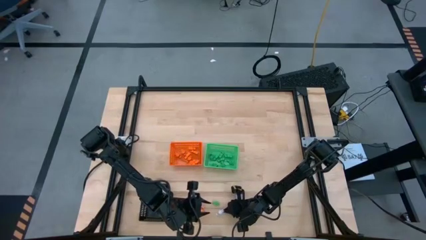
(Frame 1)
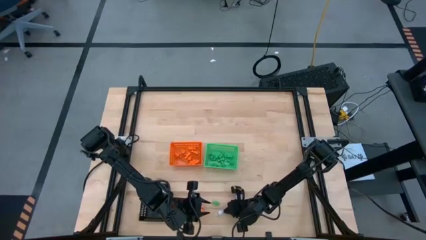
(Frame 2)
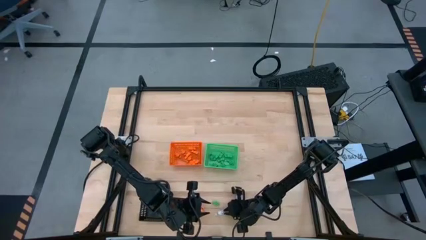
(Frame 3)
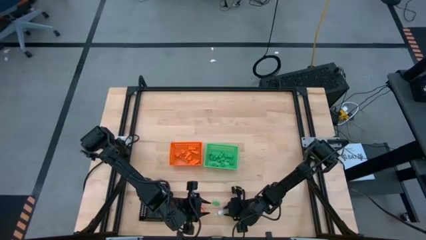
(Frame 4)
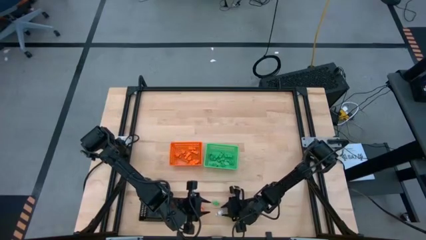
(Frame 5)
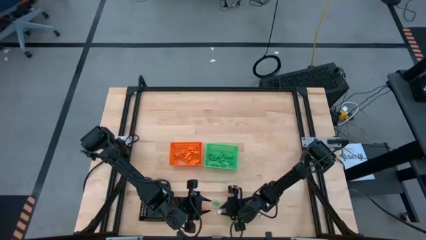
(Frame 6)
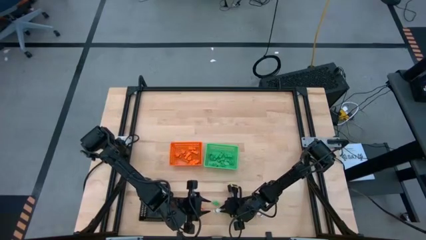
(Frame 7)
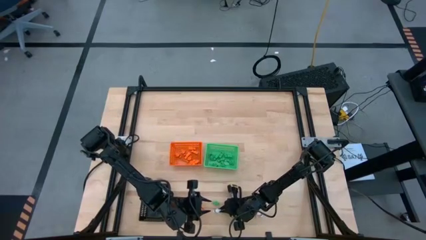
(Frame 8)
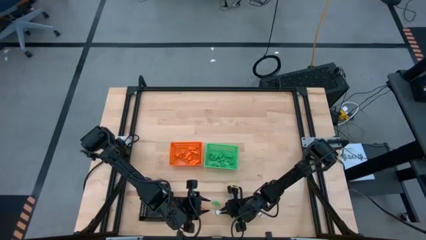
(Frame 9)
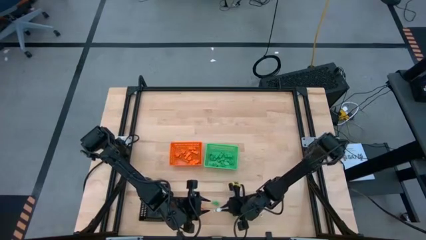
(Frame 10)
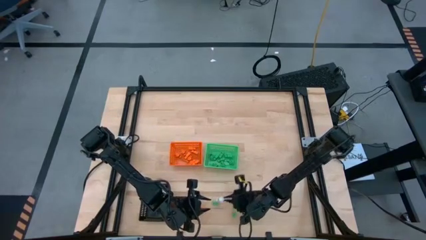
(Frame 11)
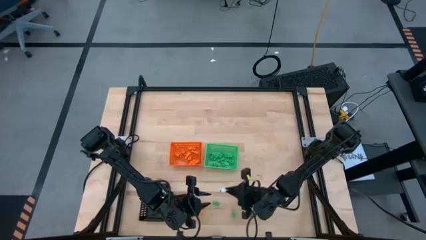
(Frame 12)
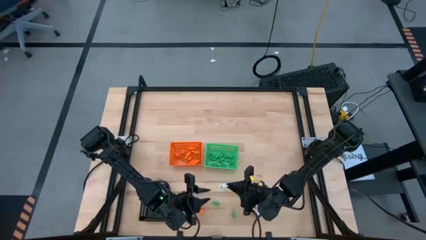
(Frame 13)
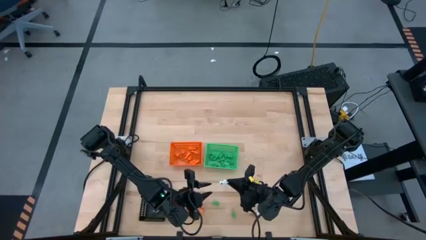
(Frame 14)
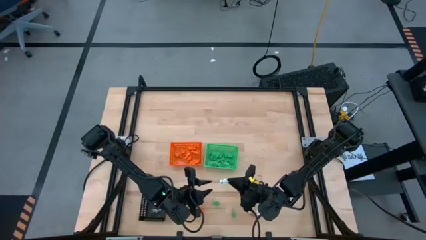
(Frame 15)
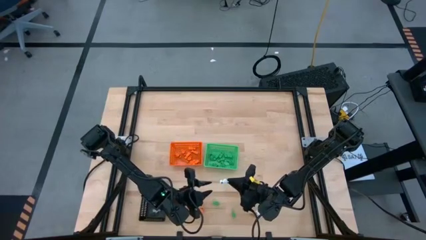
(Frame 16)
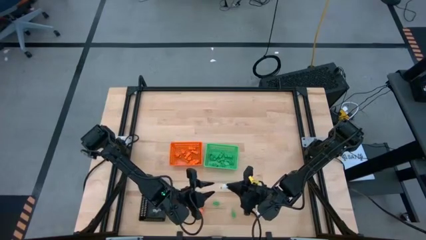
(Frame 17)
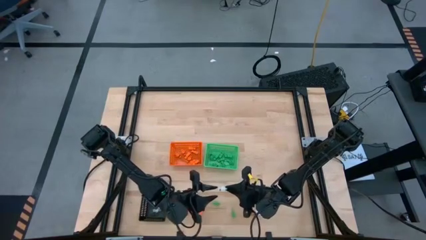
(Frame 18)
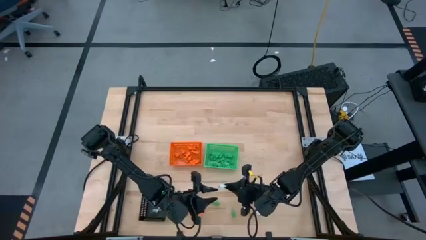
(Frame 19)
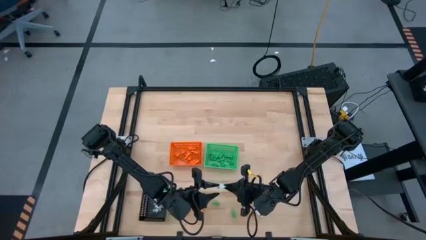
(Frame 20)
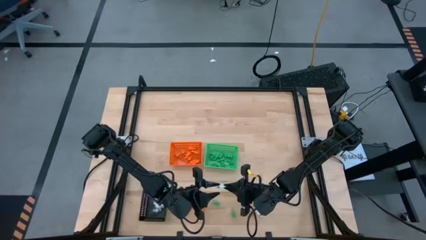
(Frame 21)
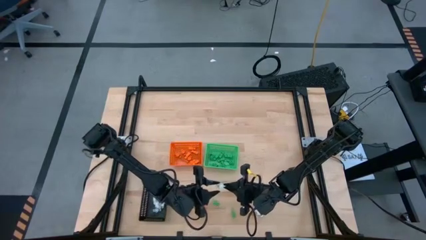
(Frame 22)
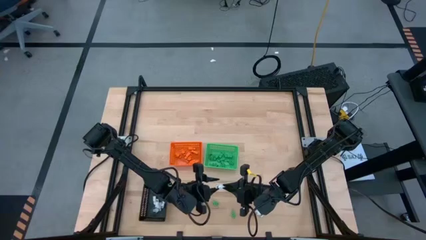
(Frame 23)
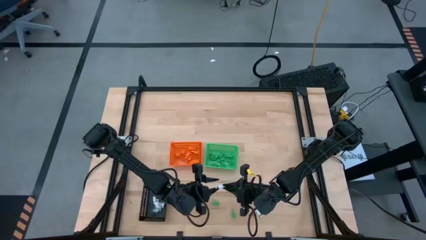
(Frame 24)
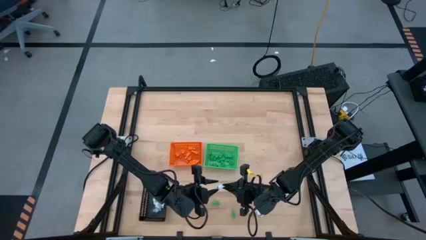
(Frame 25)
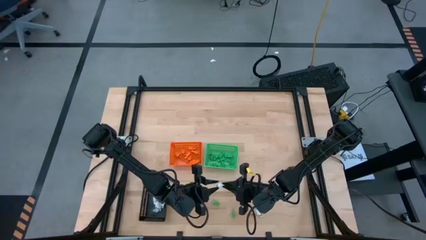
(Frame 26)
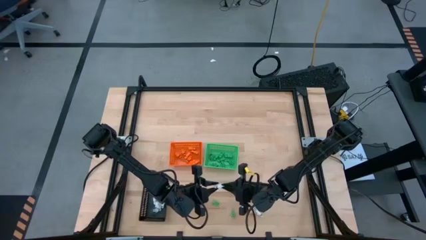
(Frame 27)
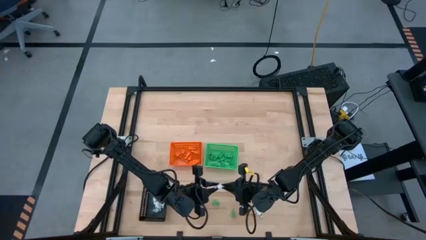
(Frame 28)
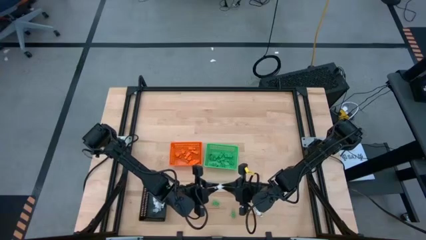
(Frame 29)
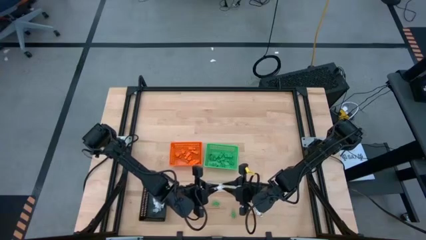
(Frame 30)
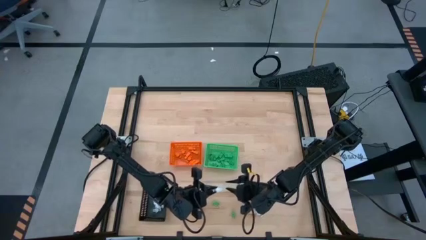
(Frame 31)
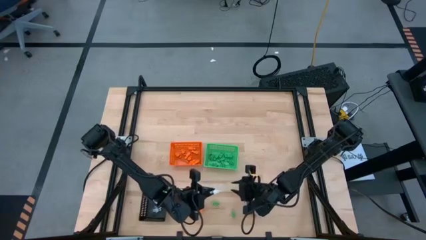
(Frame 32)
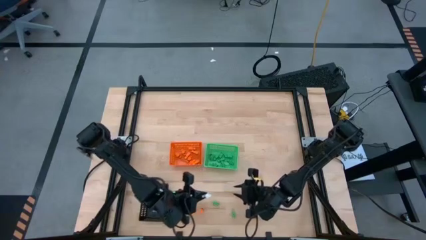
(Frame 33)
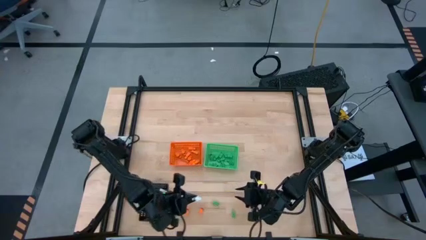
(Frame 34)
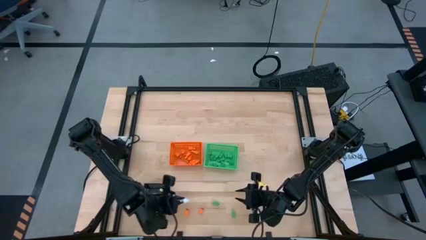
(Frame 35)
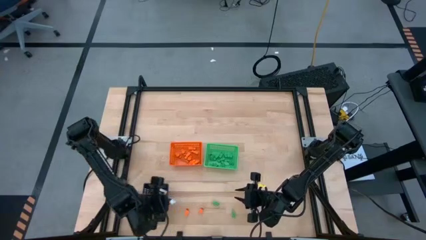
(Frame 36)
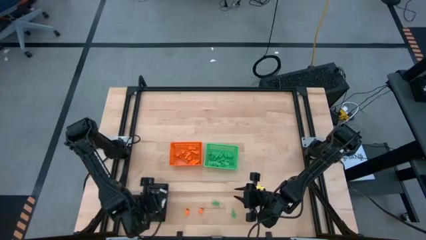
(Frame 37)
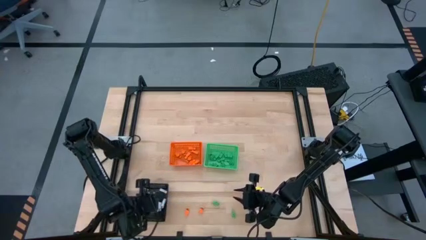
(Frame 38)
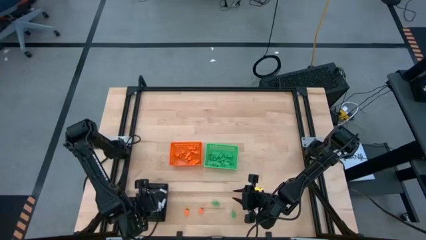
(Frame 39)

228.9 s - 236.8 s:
Task: Sort Halloween decoration
Put the white skeleton toy into the black bin

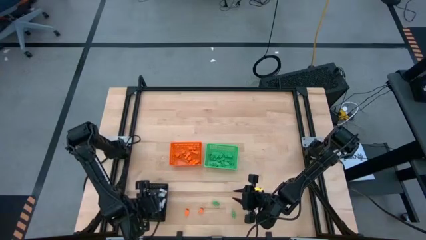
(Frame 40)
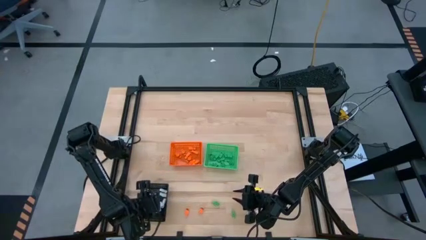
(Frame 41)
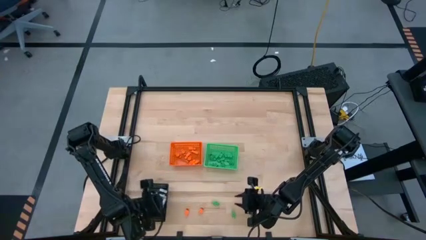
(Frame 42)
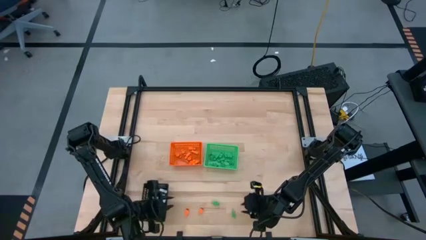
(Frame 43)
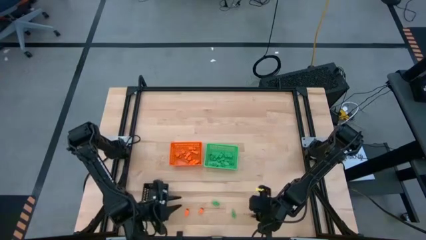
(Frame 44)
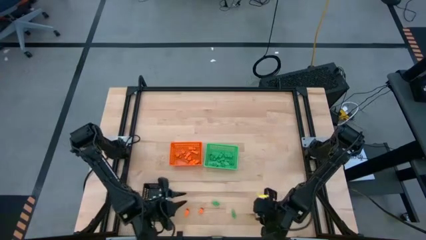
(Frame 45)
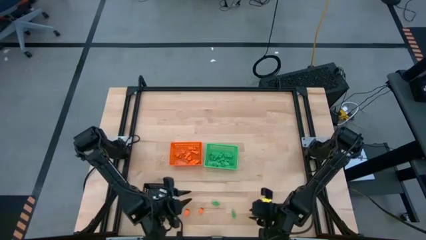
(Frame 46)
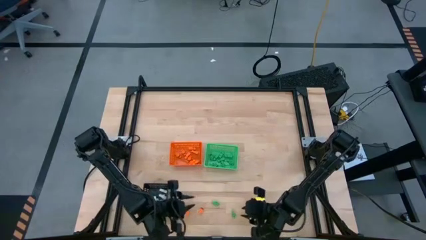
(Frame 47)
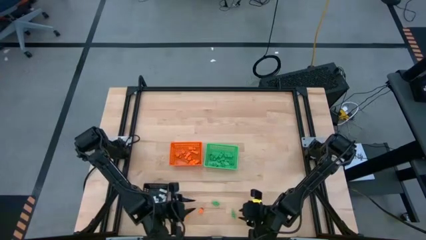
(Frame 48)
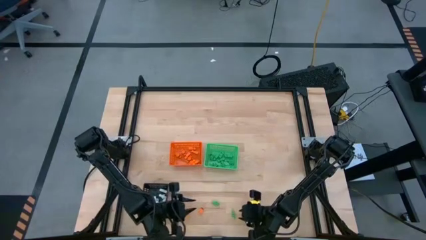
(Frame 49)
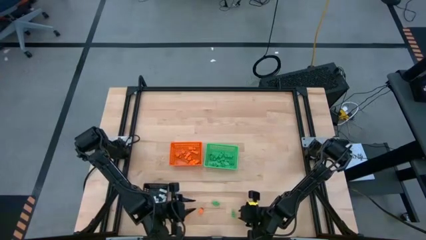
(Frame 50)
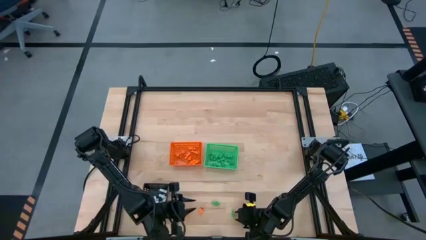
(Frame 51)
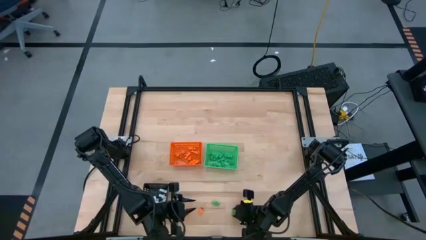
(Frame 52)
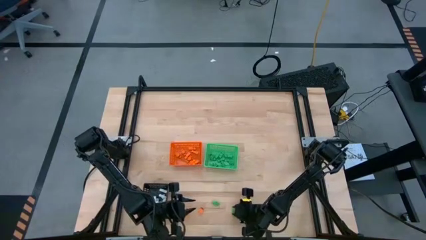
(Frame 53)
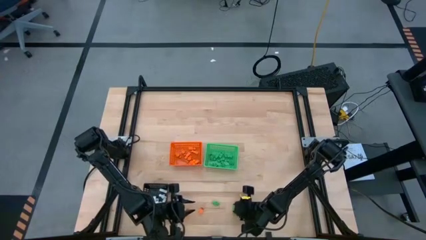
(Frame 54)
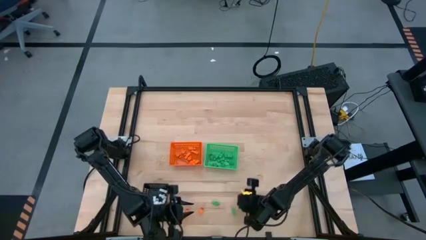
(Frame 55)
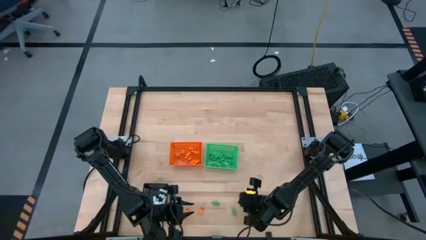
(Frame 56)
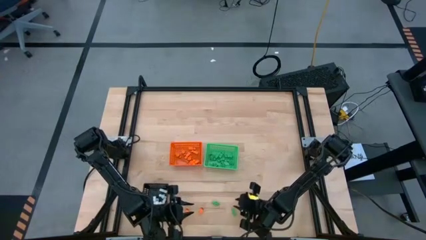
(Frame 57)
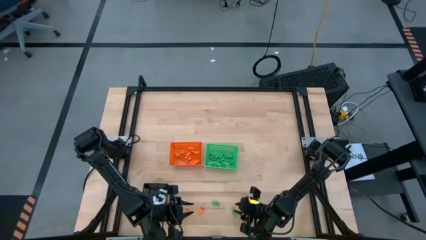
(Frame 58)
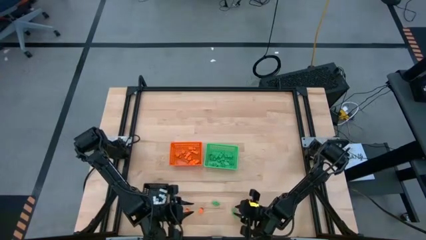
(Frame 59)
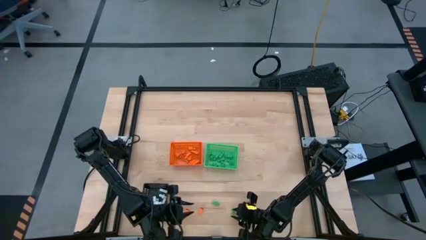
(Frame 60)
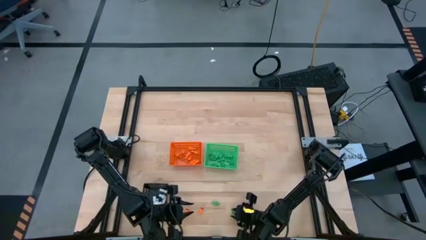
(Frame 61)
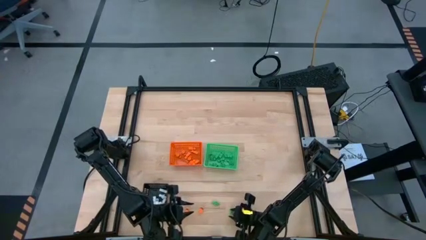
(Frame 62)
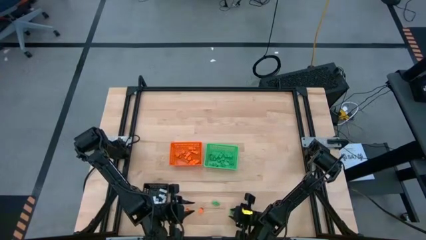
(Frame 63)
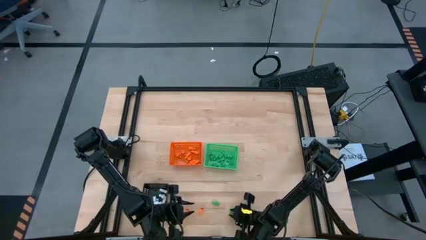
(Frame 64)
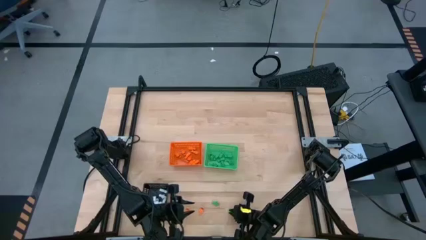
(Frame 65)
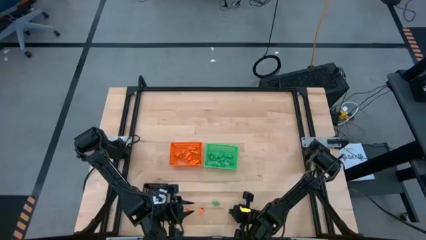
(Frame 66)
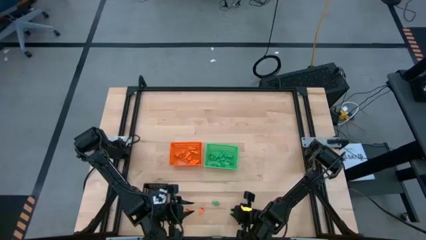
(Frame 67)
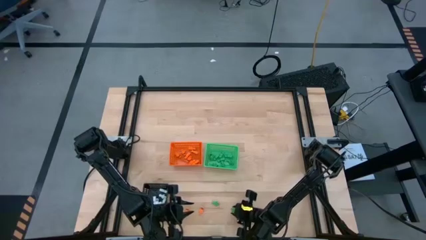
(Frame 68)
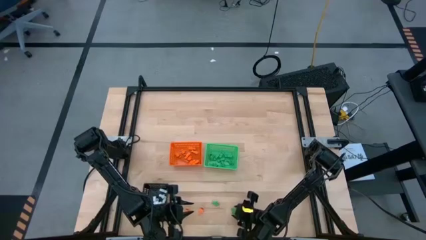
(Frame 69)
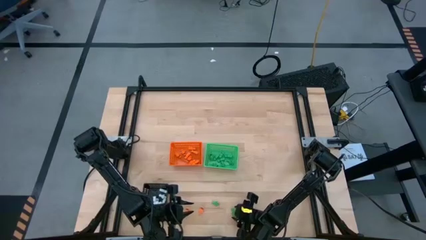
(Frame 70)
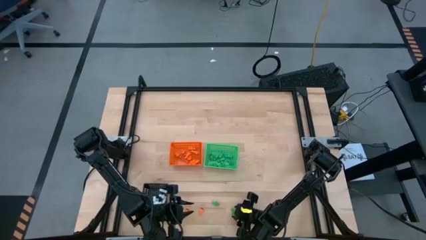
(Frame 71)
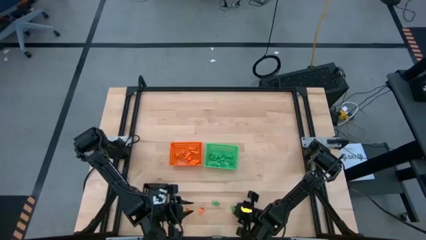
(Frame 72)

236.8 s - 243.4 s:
Put the green skeleton toy into the green bin

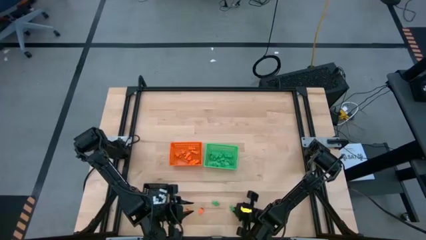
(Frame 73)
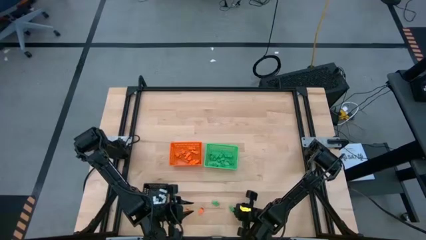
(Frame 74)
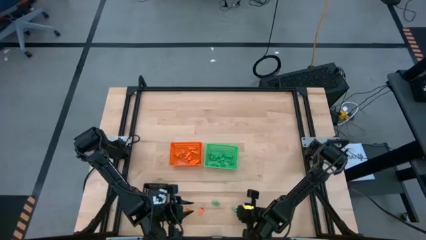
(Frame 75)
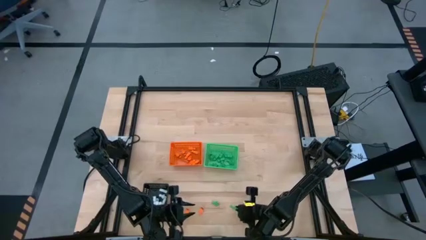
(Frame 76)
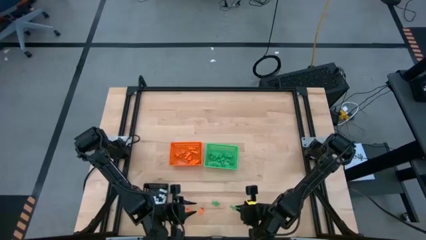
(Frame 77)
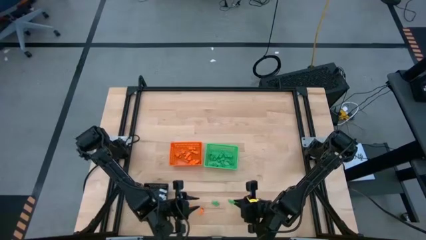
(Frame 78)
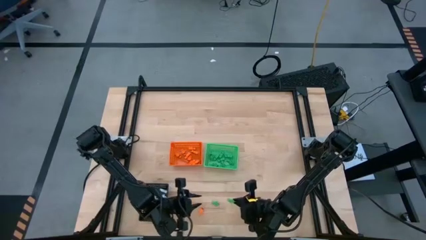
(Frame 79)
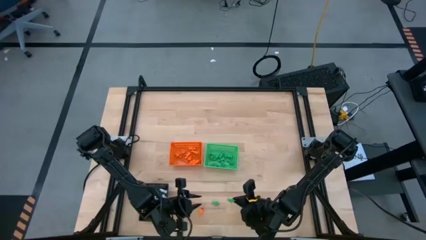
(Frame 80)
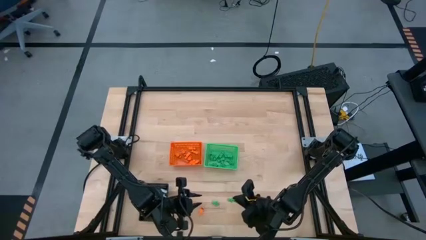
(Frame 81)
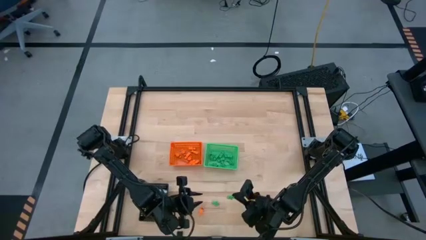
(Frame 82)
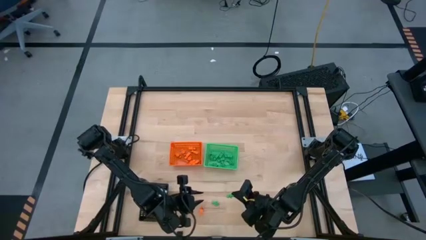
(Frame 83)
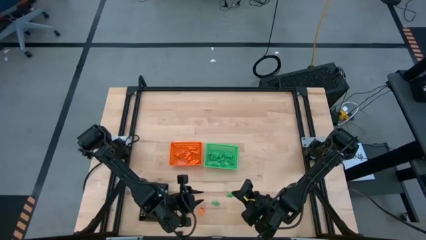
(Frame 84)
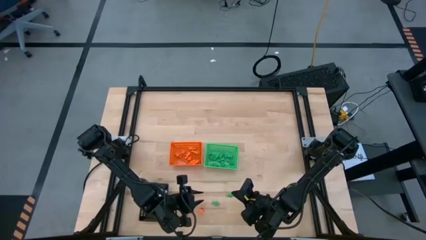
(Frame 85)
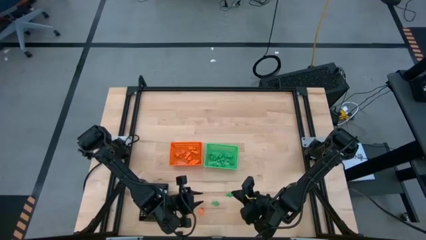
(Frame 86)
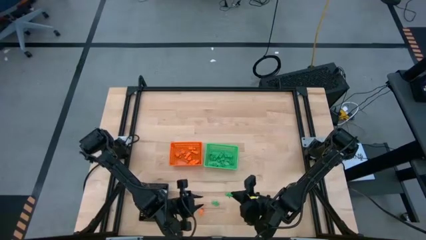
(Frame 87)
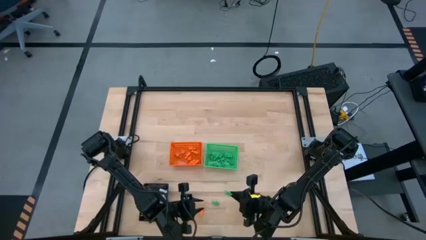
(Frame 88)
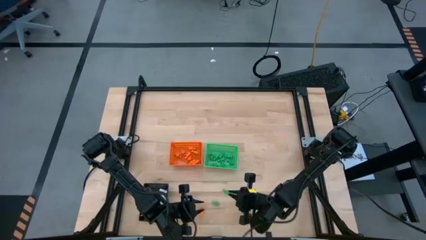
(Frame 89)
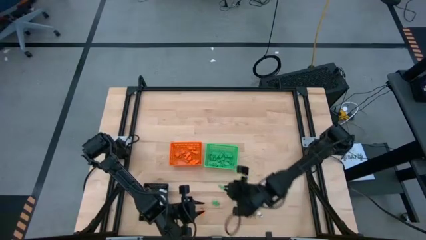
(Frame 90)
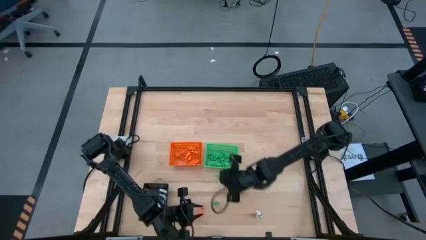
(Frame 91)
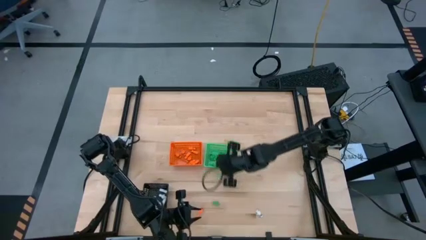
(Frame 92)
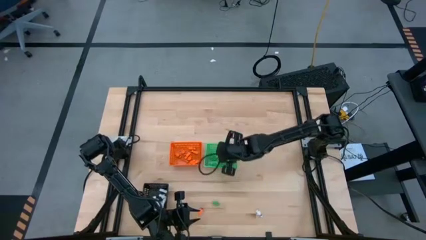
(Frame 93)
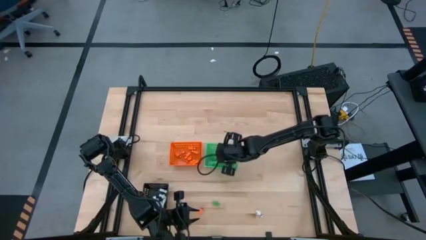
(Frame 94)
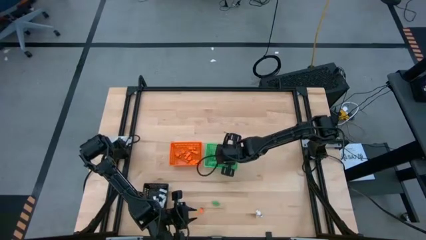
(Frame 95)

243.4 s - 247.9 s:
Put the green skeleton toy into the green bin
